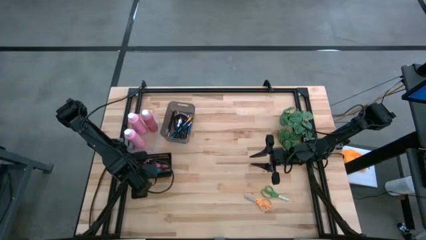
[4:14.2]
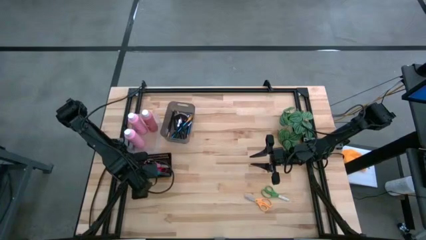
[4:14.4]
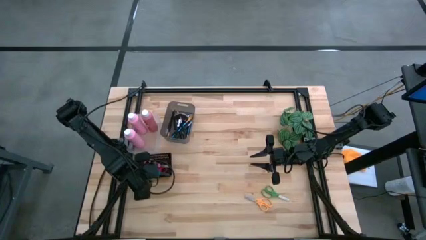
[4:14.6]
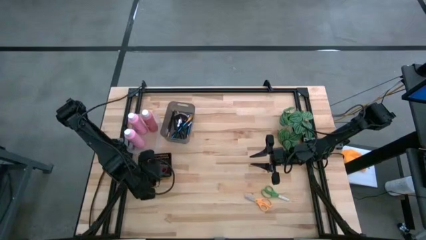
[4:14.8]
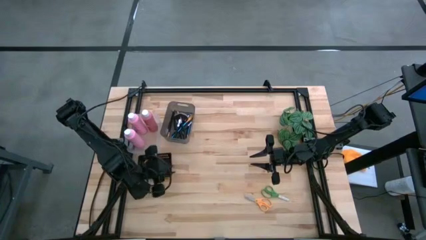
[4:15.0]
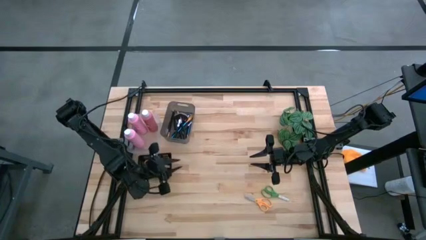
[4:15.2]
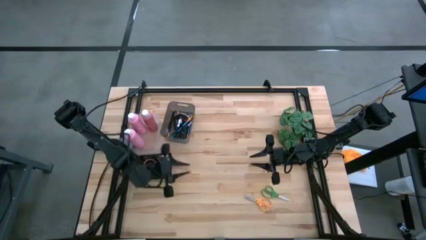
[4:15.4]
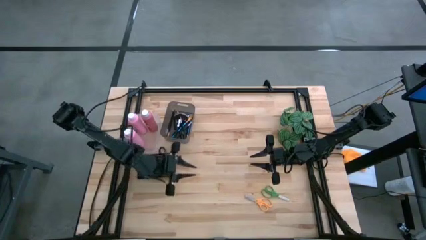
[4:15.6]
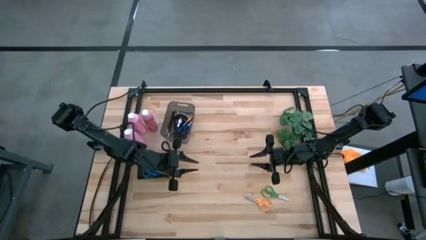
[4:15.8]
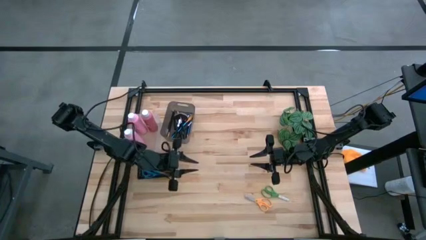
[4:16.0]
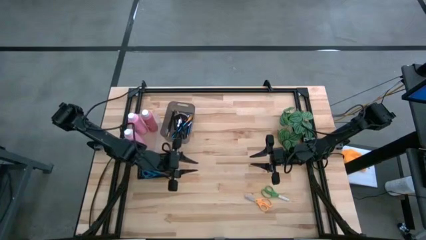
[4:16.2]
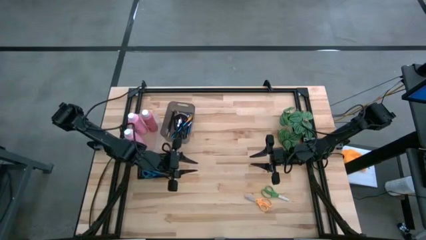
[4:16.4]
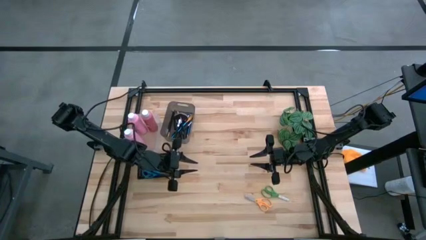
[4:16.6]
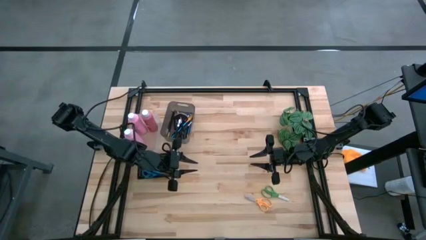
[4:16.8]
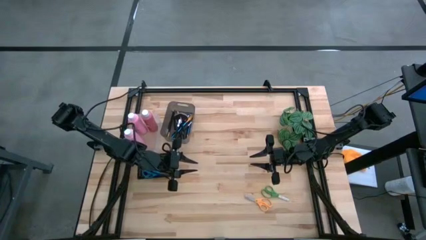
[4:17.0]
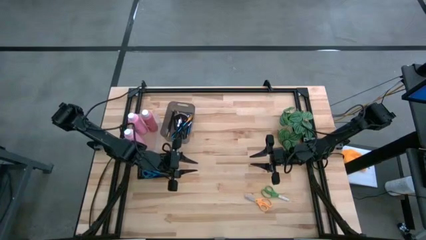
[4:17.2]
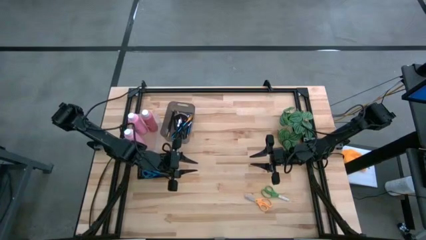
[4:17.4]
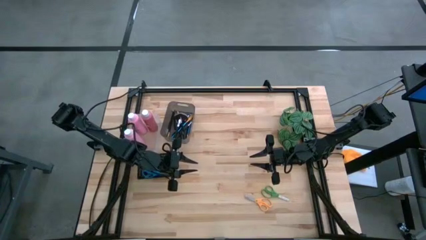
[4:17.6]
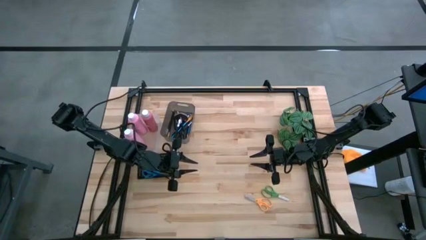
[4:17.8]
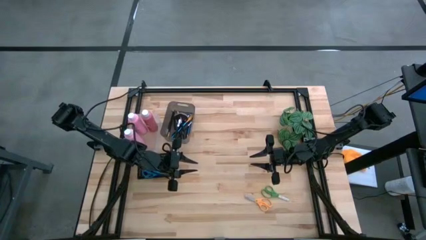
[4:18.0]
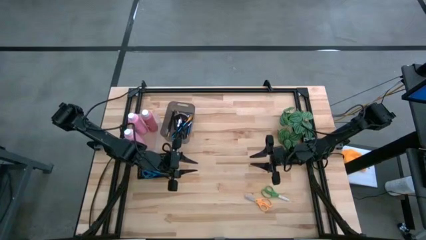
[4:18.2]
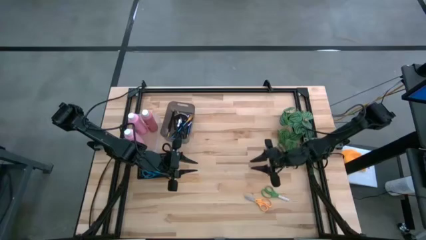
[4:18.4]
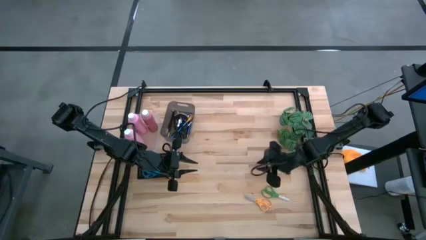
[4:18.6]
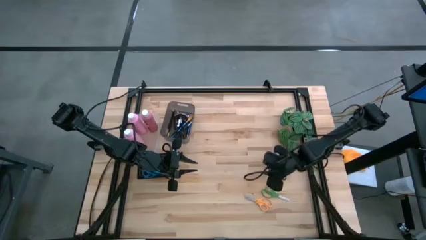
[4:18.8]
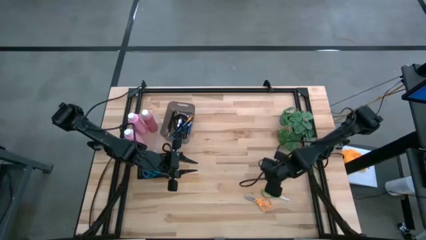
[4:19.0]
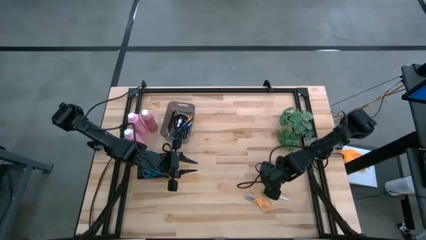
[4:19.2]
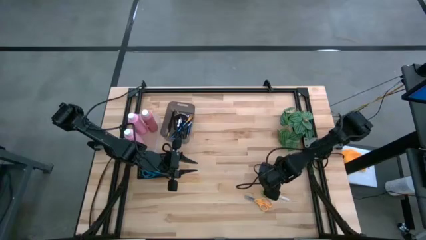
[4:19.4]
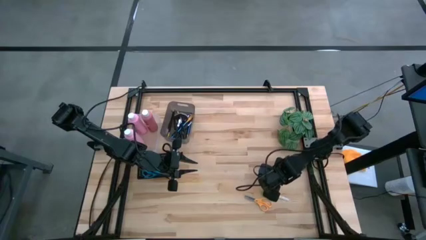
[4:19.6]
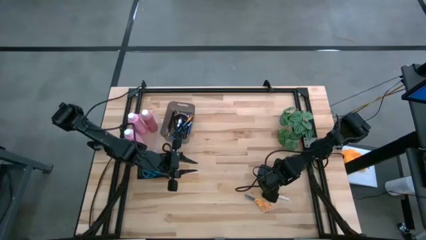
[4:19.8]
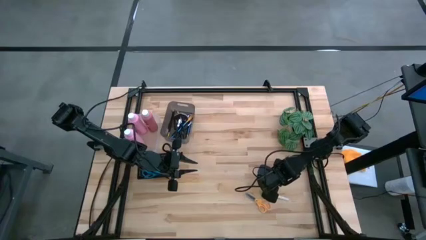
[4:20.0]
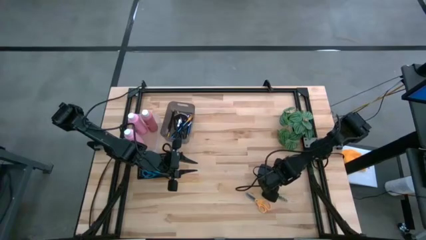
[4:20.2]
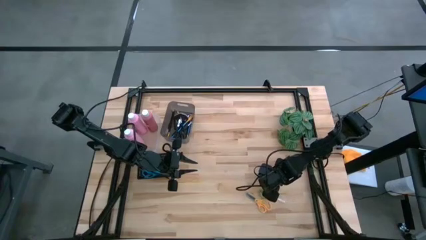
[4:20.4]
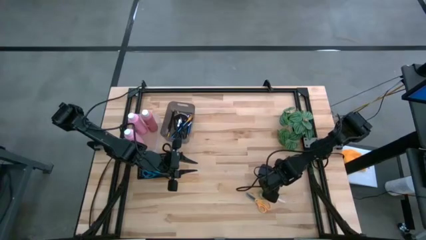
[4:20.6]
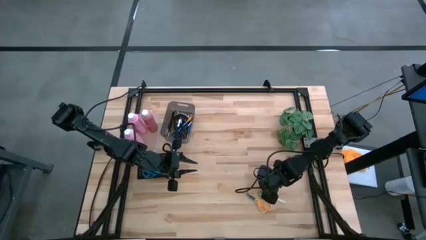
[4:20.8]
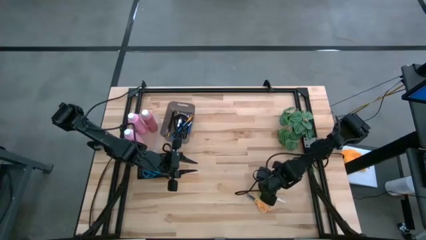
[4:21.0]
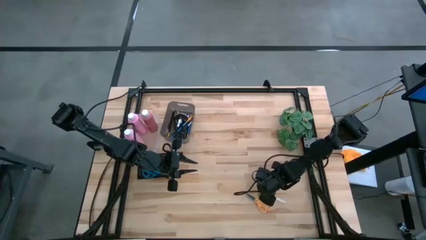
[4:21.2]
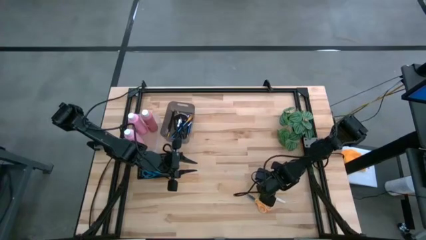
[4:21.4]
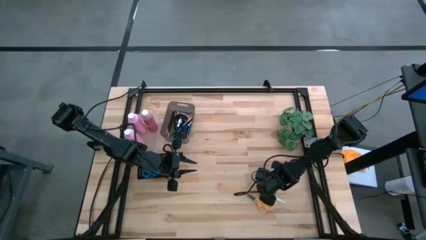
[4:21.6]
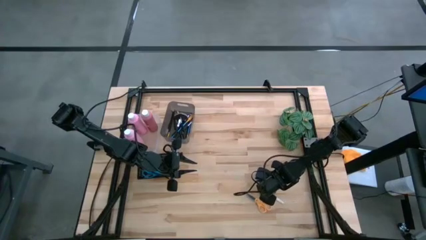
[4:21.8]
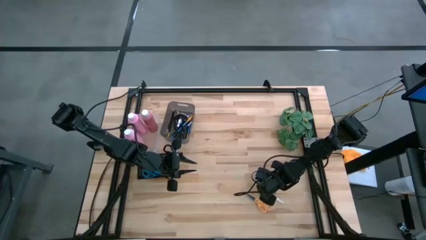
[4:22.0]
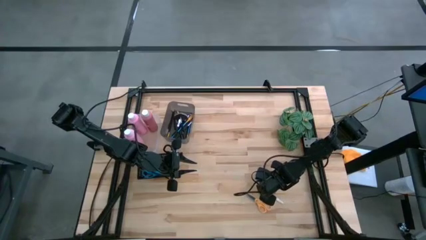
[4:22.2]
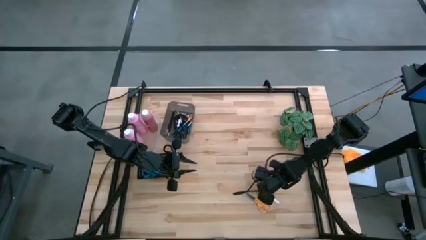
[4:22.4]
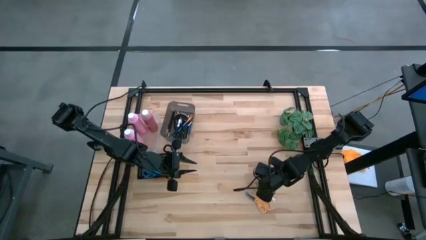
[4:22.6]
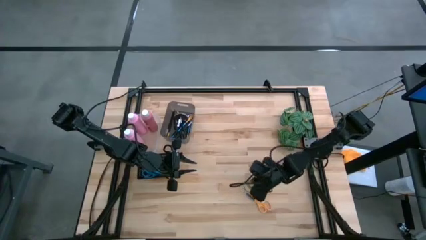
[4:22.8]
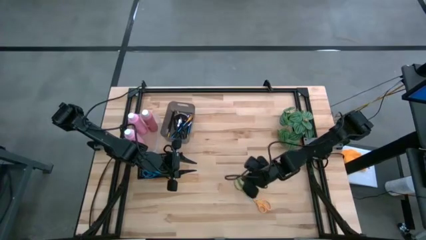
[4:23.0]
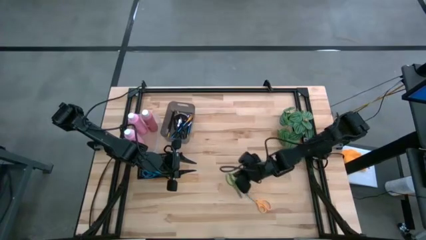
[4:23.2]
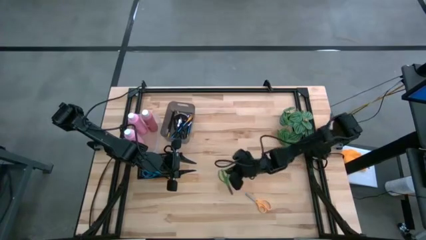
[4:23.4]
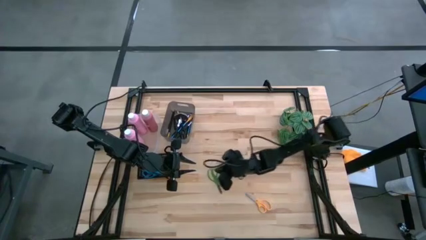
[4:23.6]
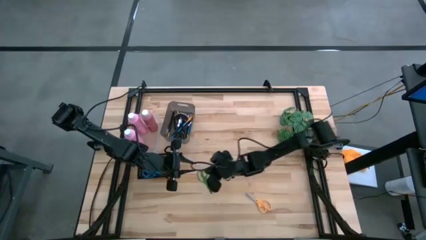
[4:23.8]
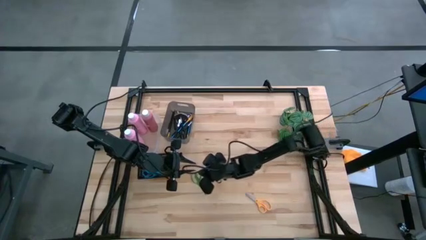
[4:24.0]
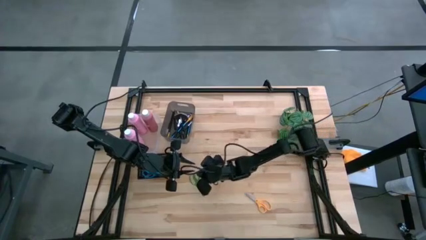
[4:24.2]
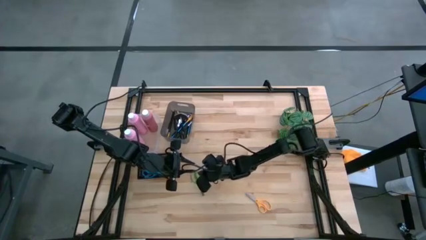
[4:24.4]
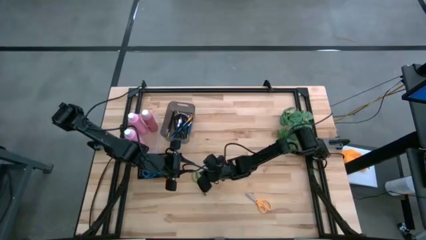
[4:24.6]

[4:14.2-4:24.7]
Task: Pick & Place Paint Supplies
Put the green scissors into the black basket
